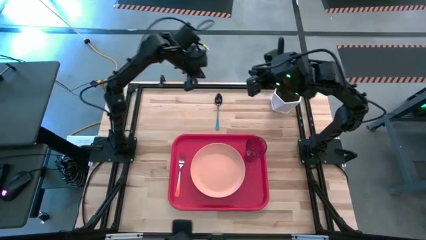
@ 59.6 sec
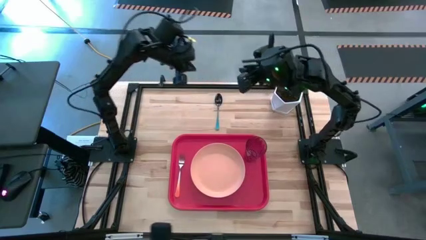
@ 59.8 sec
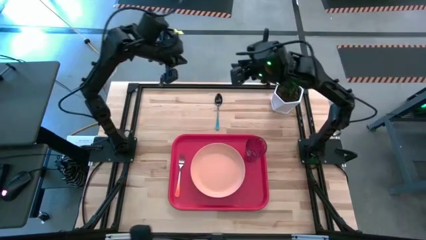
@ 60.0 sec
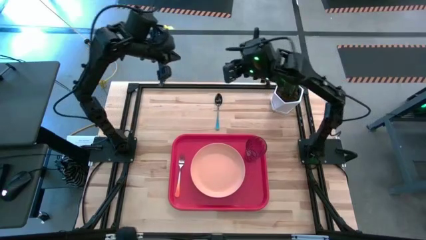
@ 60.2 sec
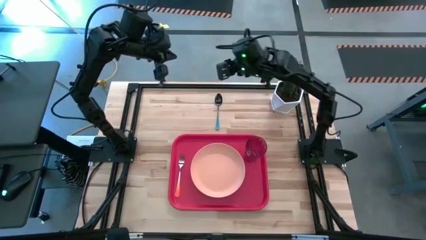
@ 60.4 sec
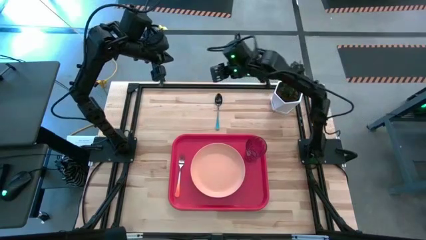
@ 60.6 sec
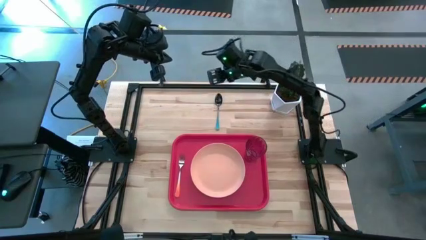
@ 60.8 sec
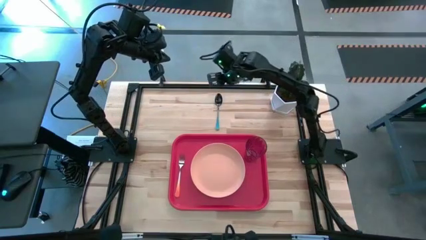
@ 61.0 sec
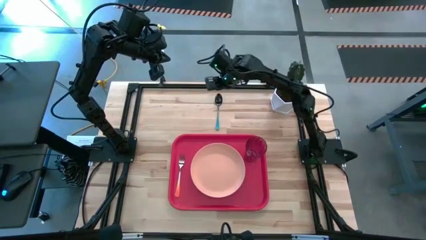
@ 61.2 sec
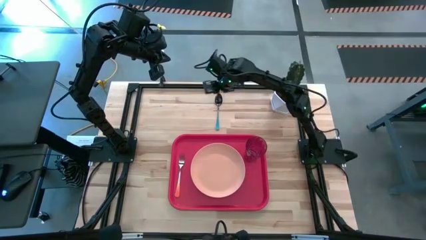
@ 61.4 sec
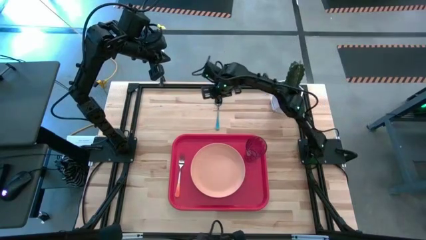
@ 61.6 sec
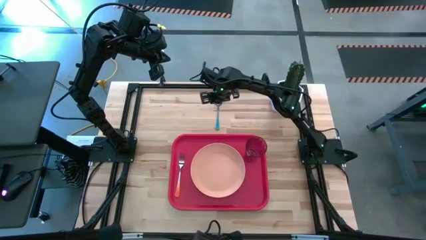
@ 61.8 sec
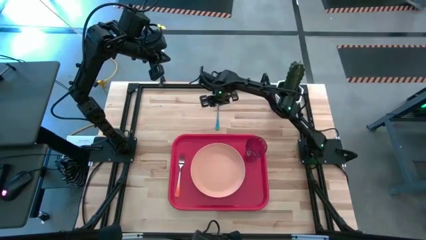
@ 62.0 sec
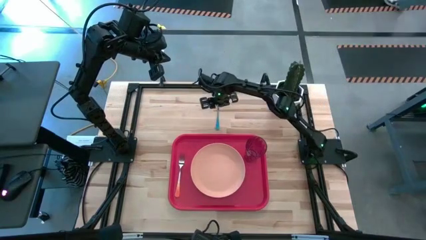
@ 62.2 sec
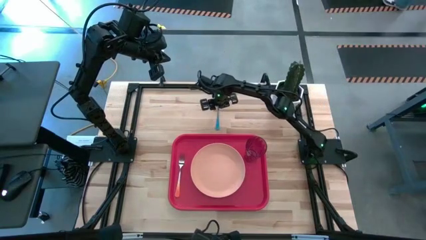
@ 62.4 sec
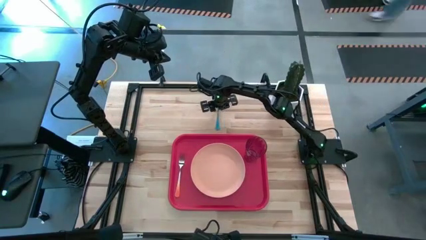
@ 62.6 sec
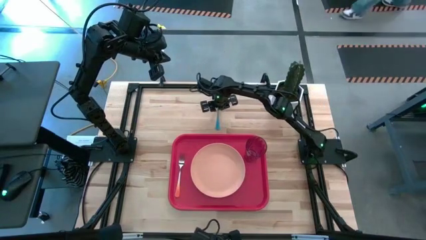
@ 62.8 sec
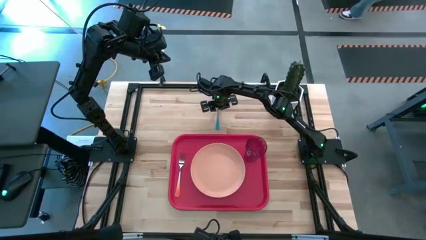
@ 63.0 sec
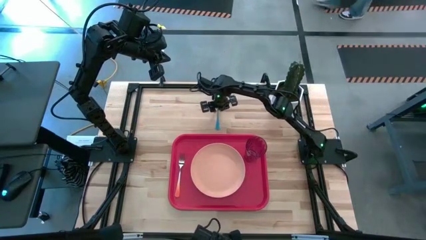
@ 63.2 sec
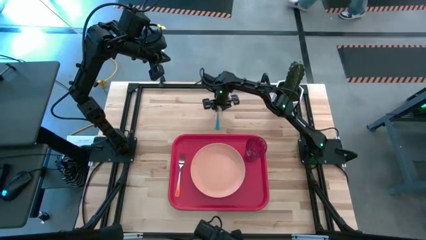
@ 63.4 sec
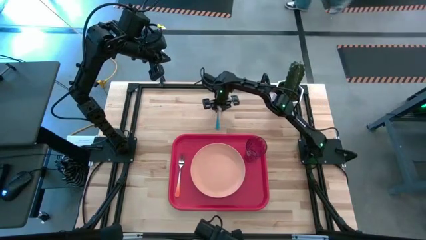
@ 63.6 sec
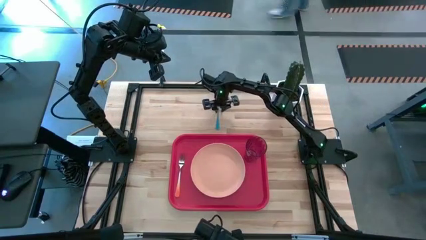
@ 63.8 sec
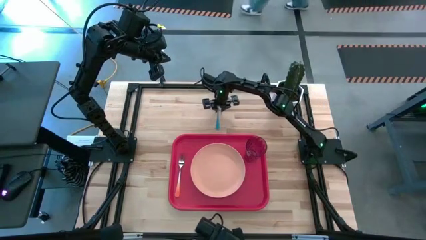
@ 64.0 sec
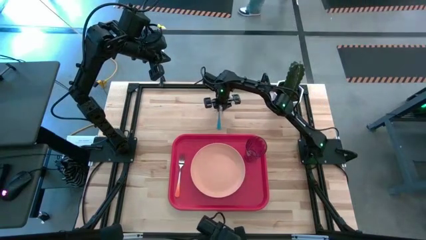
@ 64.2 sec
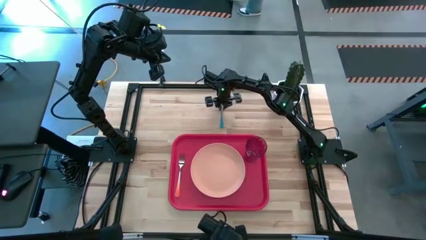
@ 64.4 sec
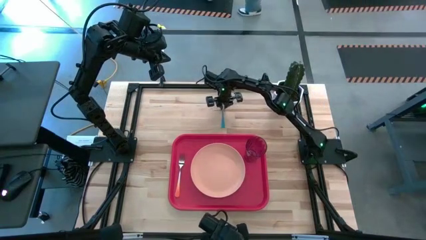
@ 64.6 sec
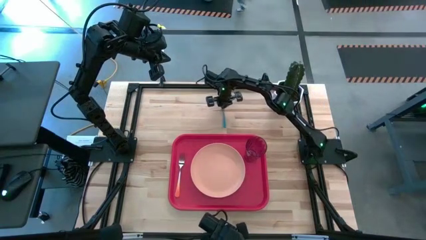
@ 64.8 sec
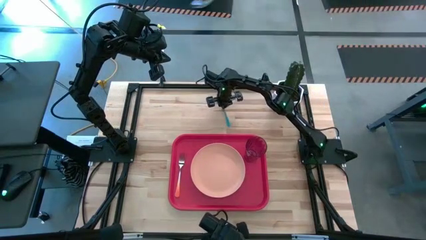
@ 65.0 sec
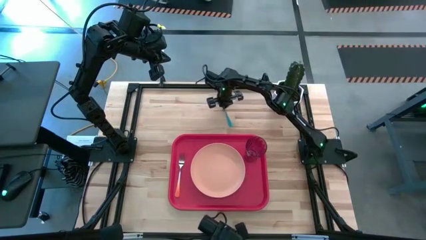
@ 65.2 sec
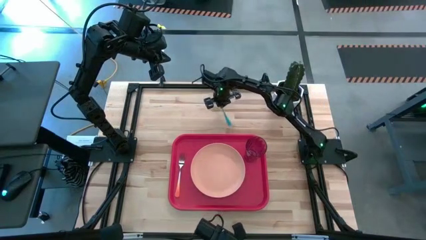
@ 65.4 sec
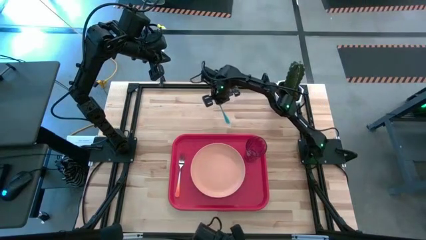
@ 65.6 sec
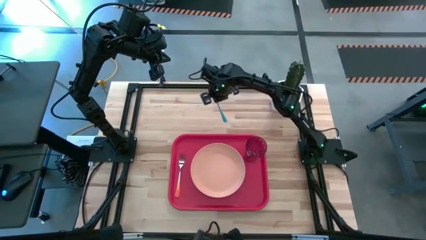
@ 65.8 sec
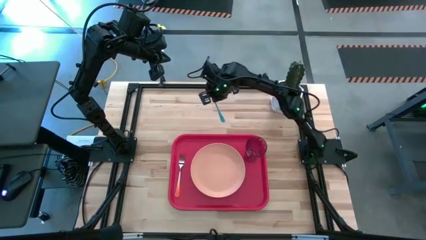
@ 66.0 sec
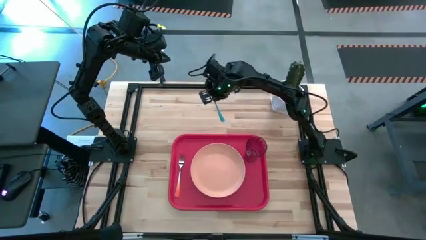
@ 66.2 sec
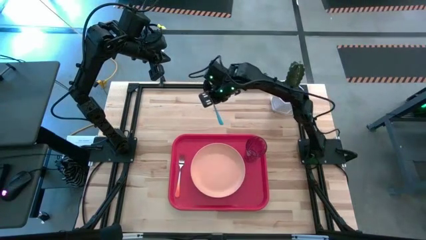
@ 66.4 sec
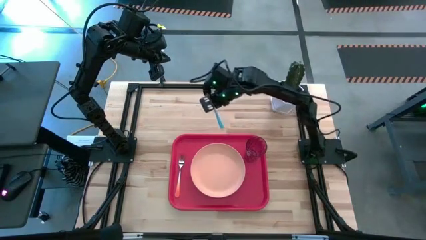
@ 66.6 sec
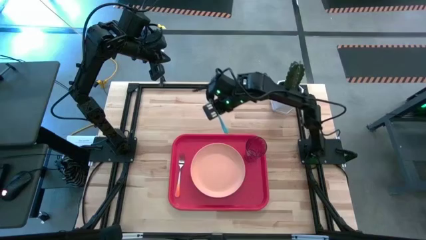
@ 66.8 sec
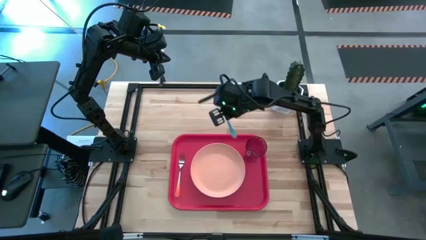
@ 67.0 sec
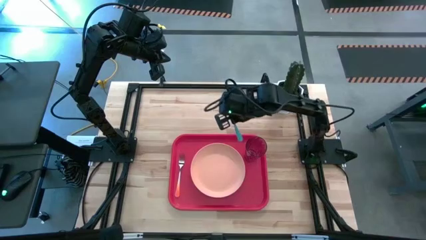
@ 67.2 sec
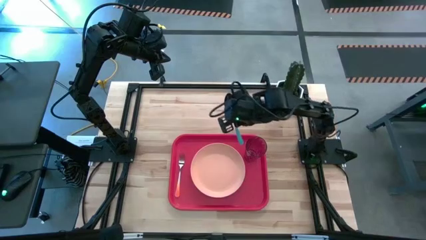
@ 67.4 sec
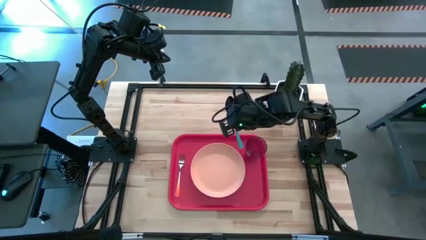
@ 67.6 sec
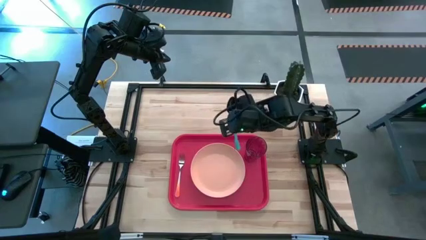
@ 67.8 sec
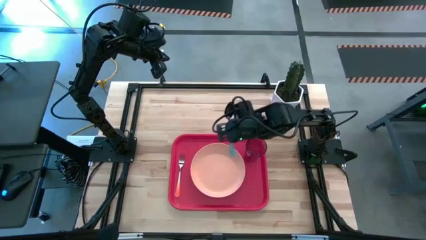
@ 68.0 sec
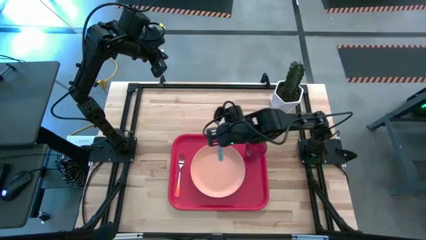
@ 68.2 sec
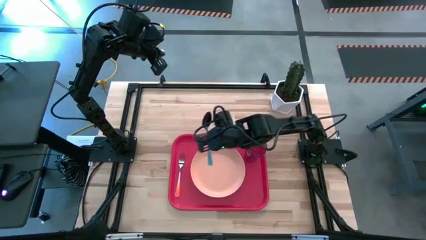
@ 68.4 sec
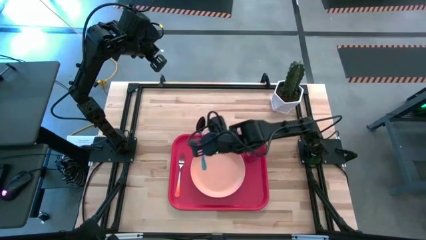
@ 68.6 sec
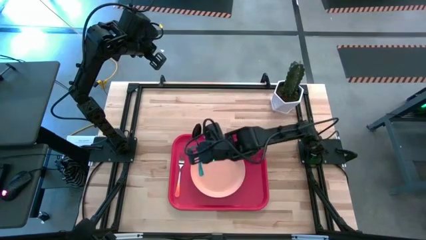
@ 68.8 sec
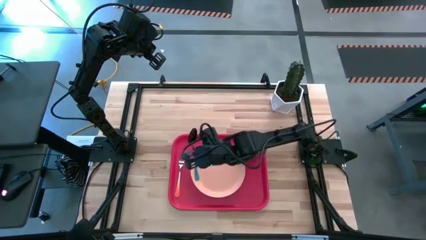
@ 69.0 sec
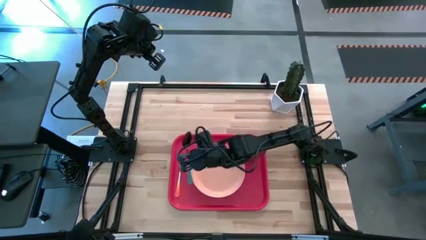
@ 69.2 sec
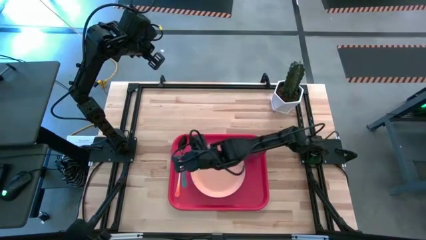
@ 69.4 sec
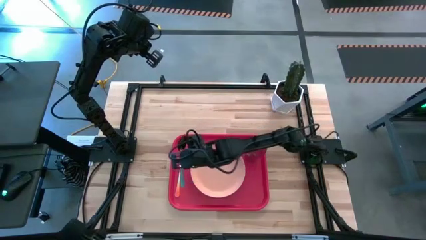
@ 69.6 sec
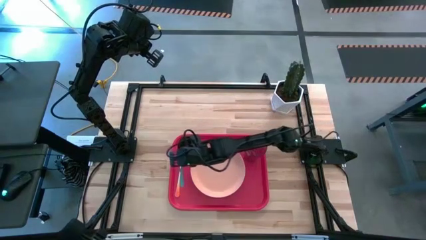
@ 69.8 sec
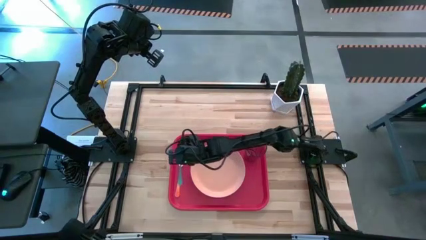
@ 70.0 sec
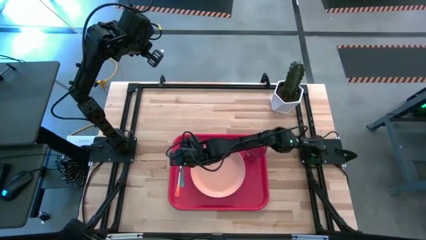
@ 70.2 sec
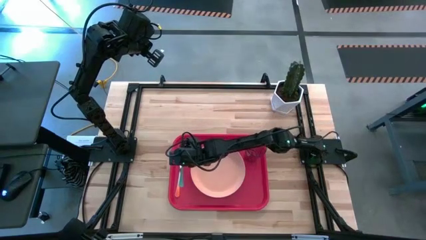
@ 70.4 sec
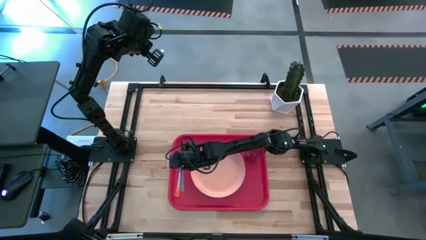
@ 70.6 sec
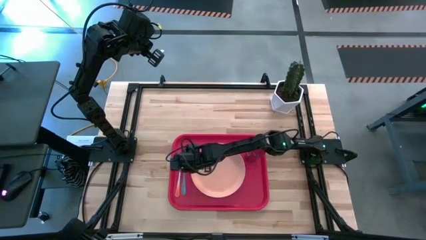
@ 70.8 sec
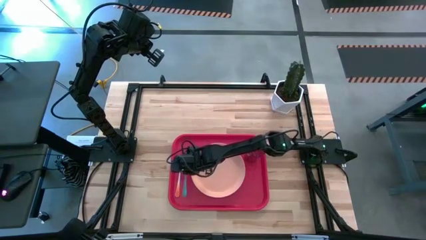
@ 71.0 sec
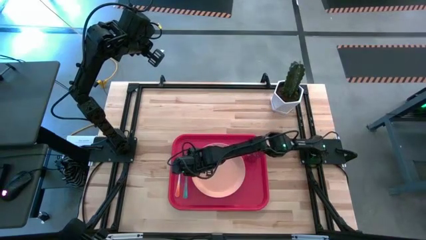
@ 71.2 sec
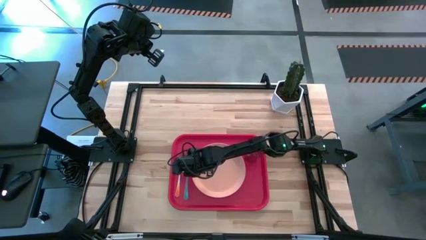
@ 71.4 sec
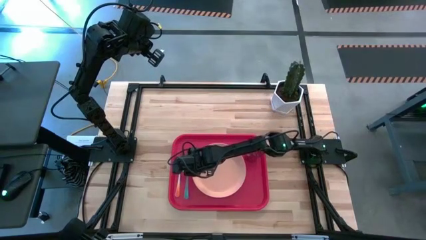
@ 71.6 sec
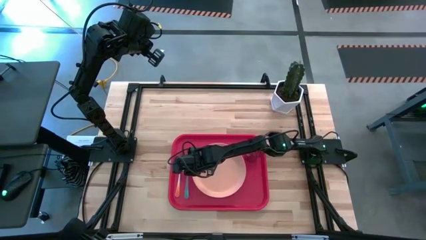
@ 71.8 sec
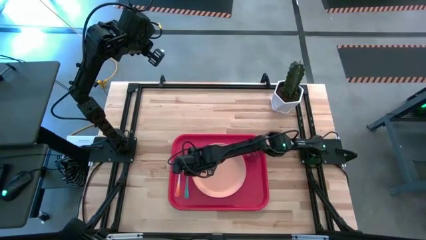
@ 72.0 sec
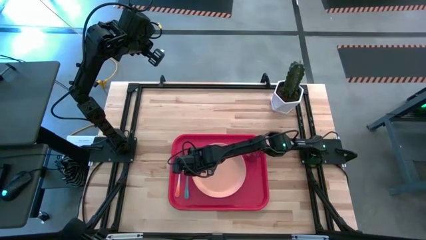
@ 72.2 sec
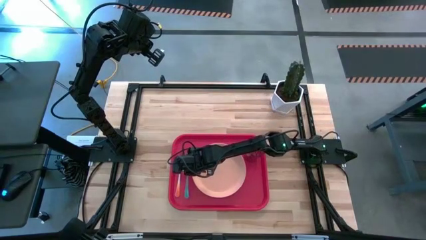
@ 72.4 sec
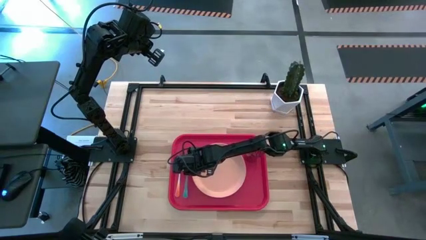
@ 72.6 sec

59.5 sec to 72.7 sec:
Task: Pick and place plate/cup/fork/spoon on tray
Put the blue spoon to the right of the orange fork on the red tray

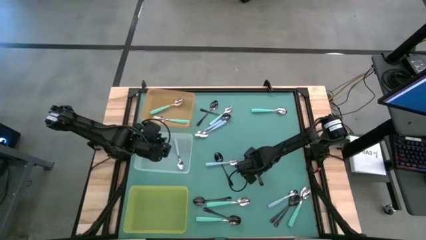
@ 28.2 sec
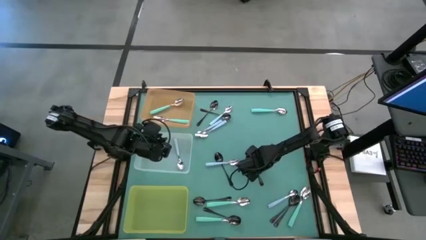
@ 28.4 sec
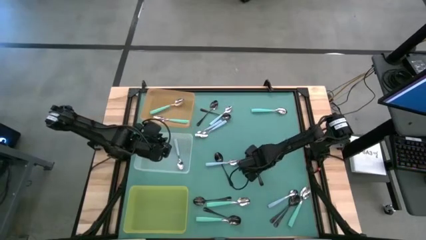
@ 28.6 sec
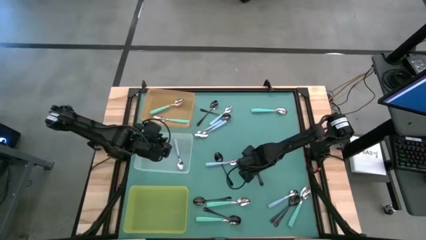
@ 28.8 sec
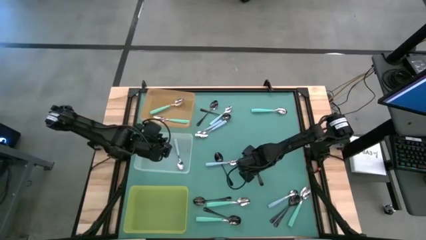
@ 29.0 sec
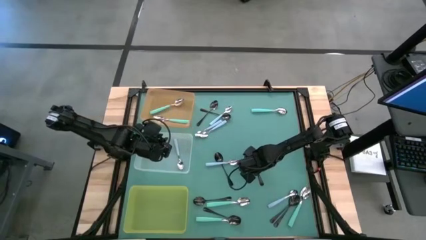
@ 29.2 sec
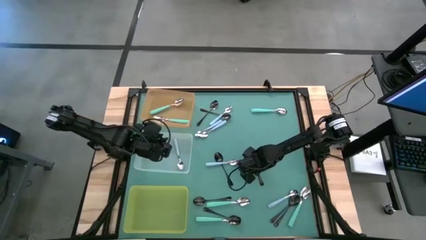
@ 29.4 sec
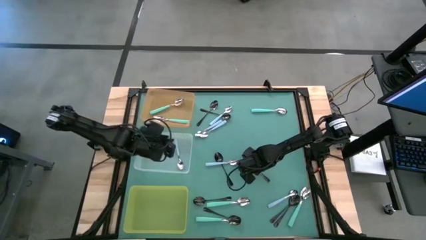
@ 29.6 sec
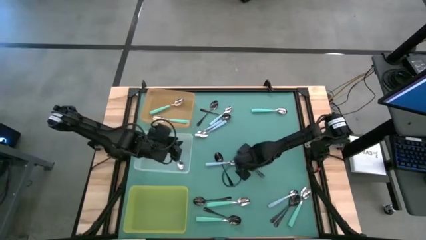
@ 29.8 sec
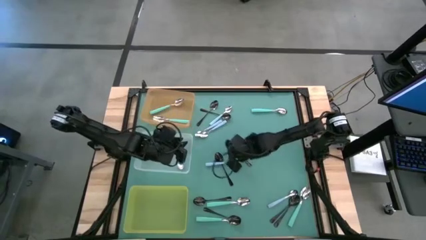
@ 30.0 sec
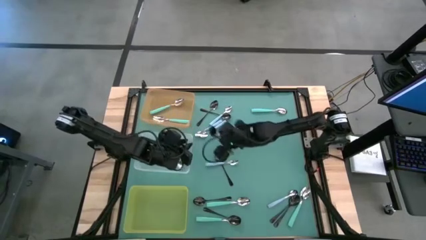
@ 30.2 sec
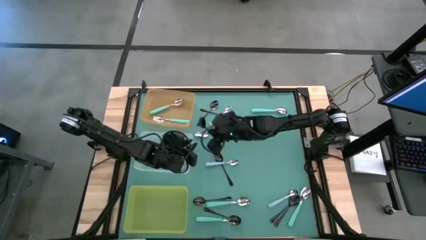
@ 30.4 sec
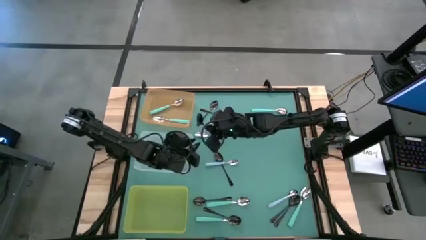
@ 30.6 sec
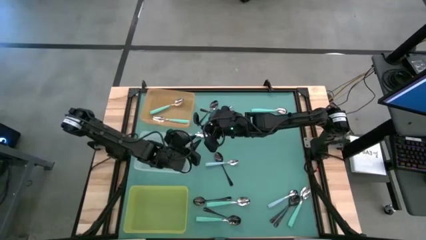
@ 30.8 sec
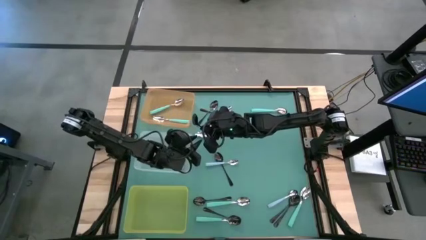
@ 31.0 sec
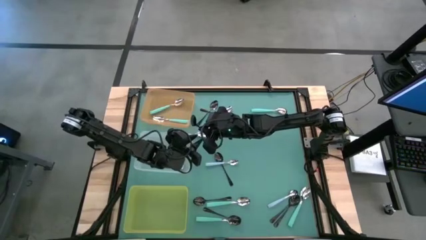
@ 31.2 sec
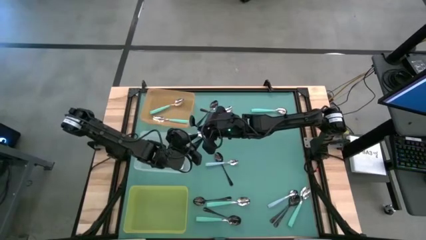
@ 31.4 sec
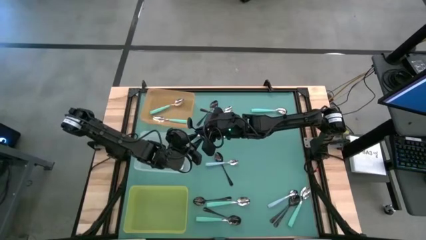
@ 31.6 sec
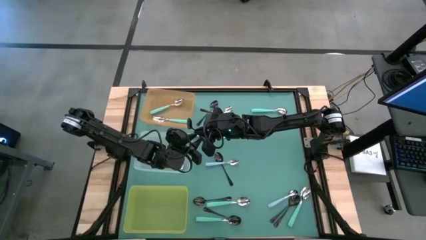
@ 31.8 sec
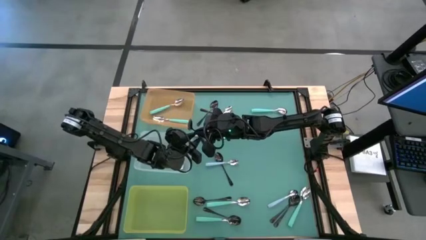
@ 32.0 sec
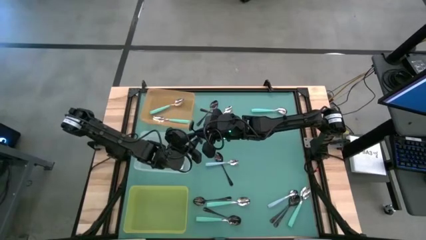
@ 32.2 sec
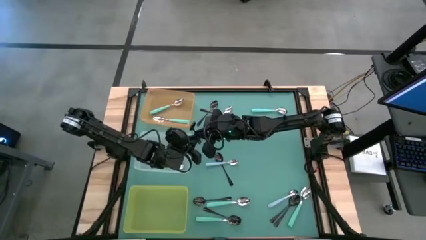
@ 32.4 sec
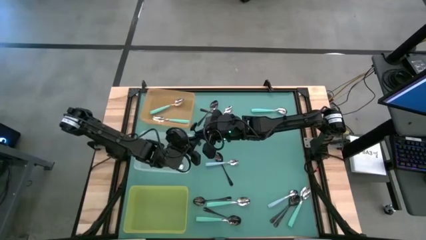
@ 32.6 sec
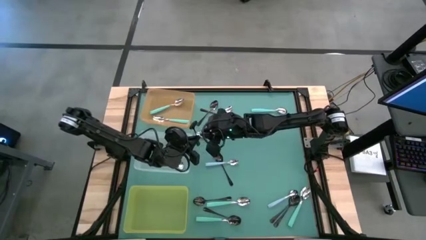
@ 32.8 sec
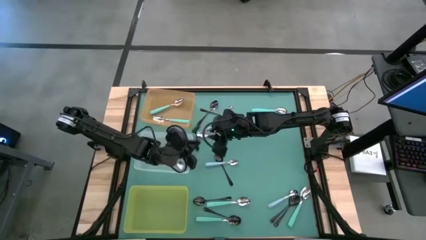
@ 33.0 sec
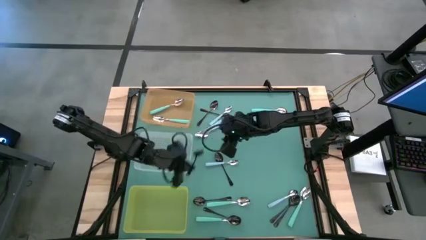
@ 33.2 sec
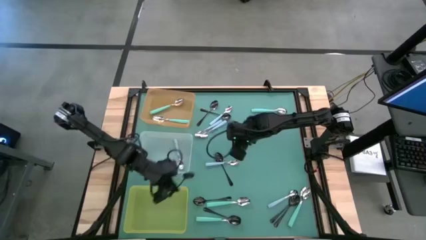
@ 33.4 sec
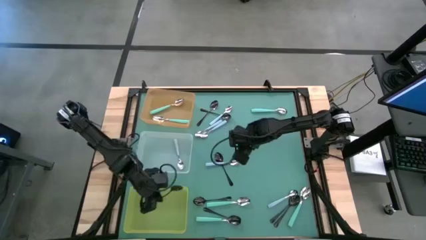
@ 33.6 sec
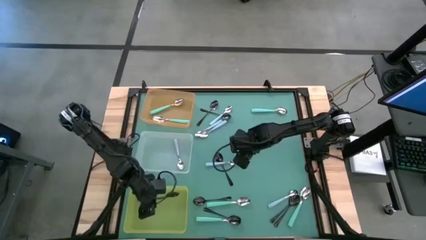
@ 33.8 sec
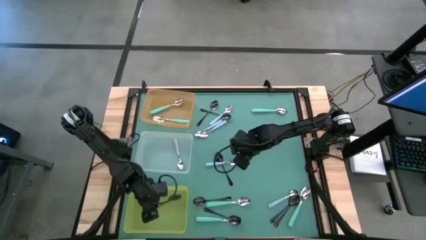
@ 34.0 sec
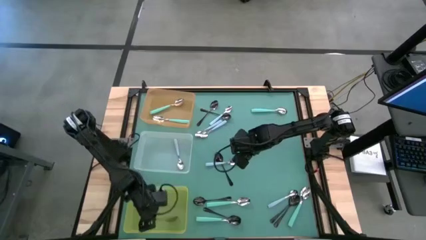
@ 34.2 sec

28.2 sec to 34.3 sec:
Task: Sort silverware by color (type)
Put the black spoon into the yellow bin
